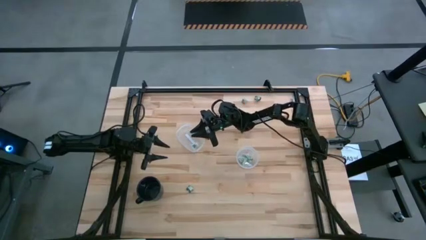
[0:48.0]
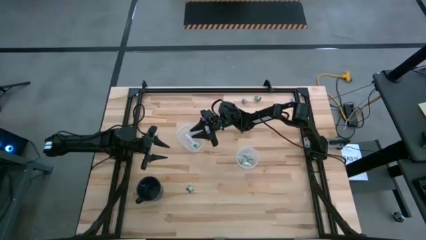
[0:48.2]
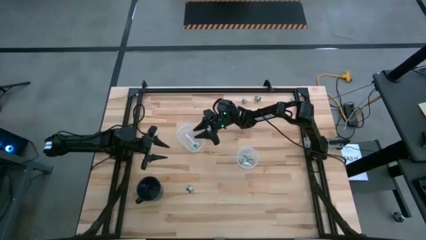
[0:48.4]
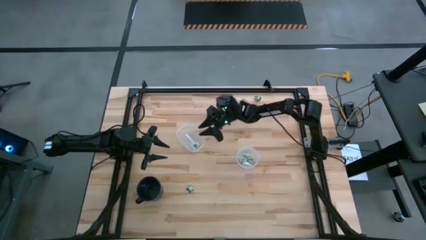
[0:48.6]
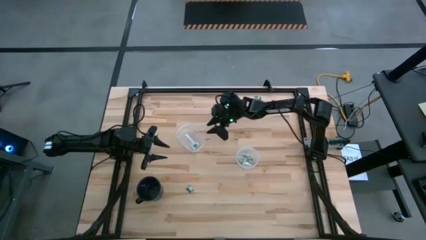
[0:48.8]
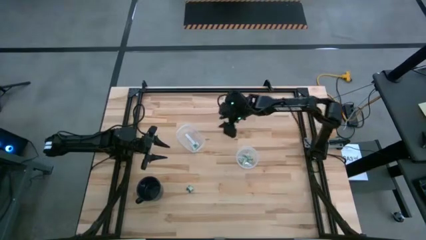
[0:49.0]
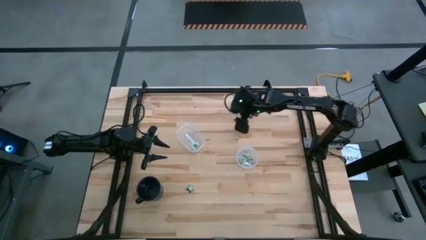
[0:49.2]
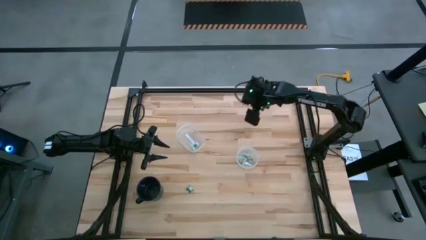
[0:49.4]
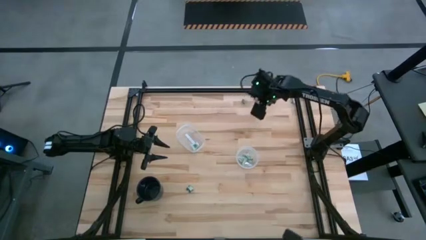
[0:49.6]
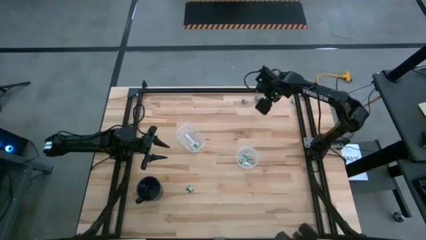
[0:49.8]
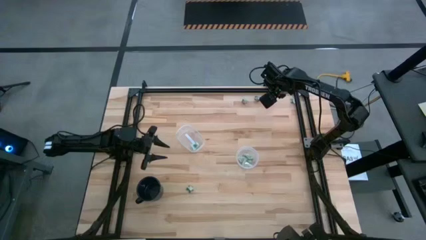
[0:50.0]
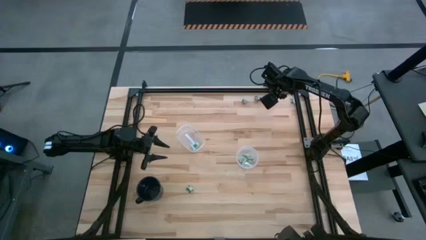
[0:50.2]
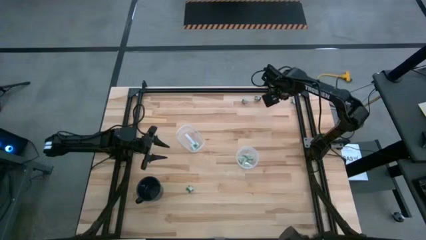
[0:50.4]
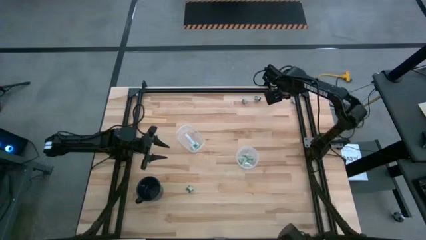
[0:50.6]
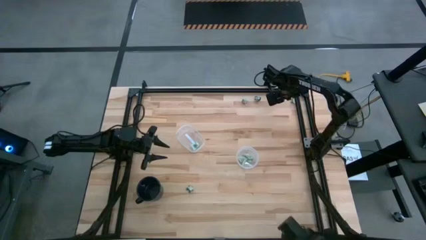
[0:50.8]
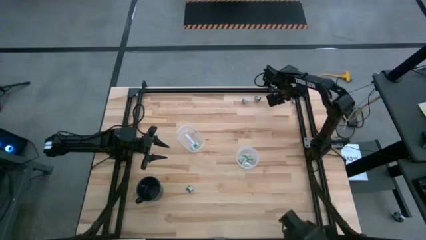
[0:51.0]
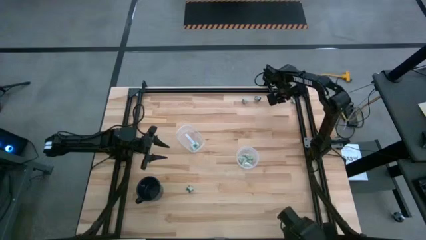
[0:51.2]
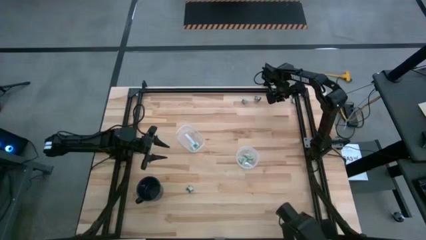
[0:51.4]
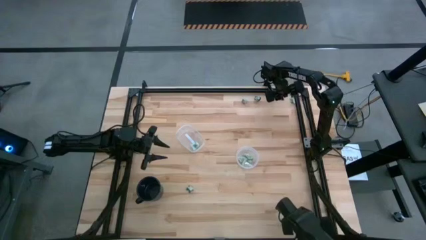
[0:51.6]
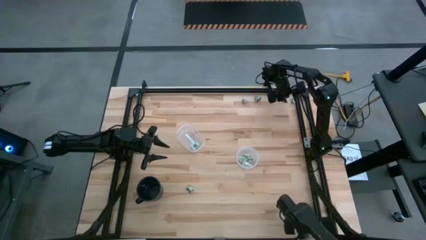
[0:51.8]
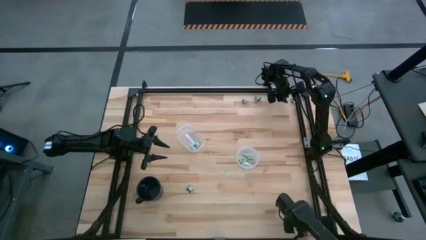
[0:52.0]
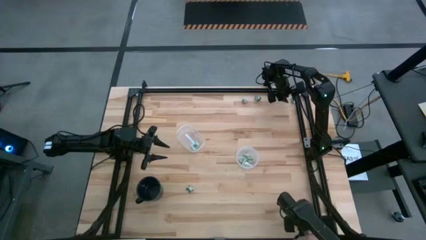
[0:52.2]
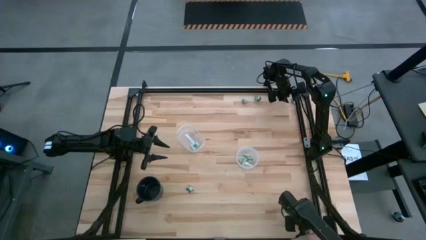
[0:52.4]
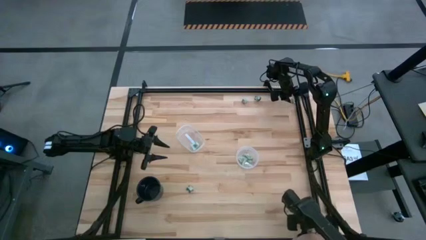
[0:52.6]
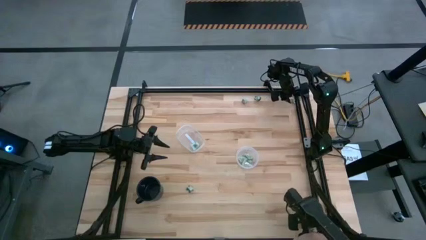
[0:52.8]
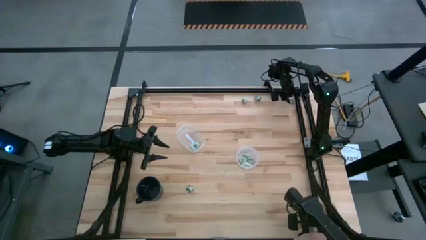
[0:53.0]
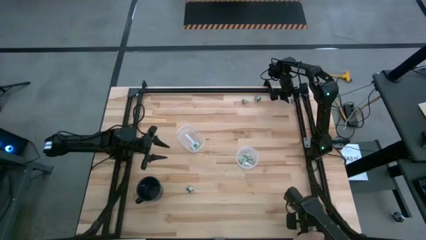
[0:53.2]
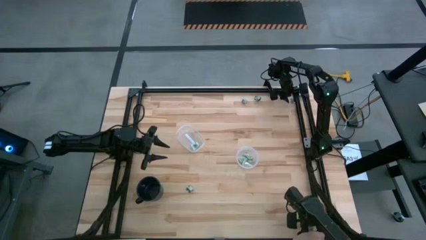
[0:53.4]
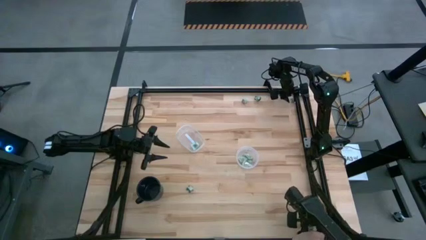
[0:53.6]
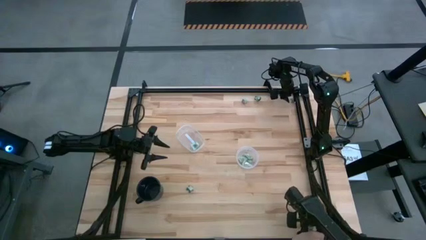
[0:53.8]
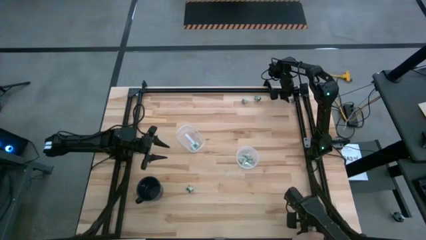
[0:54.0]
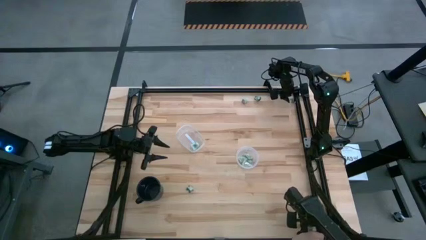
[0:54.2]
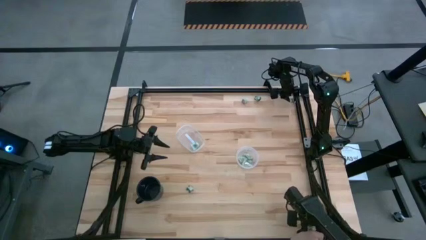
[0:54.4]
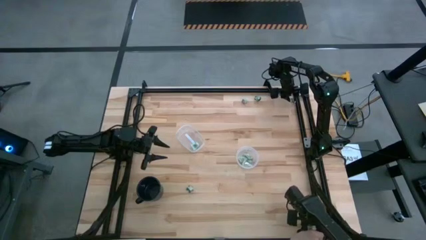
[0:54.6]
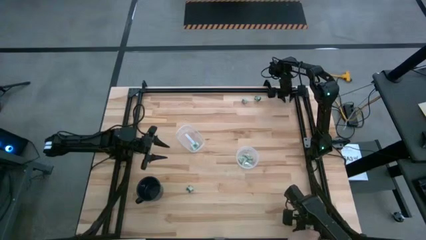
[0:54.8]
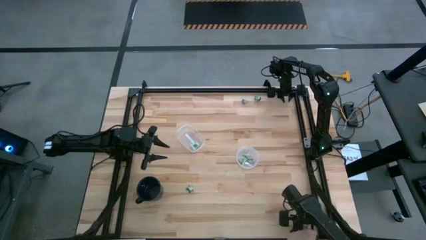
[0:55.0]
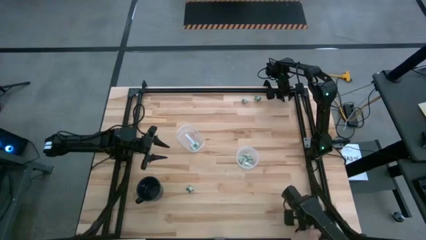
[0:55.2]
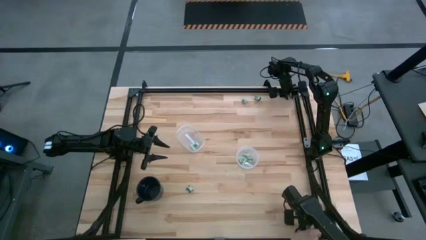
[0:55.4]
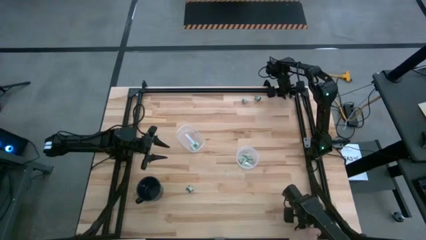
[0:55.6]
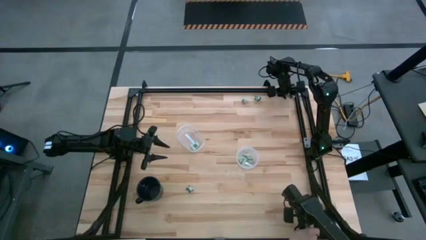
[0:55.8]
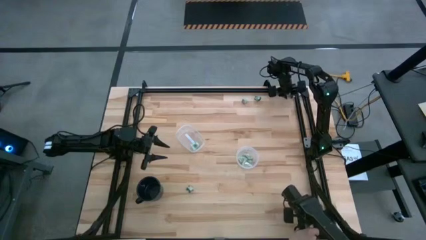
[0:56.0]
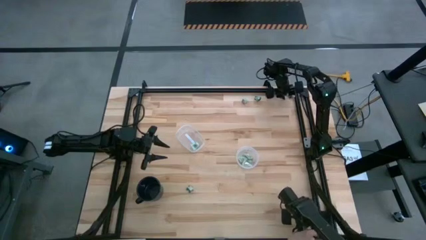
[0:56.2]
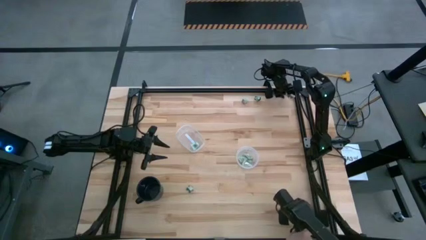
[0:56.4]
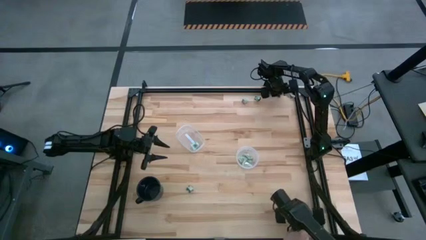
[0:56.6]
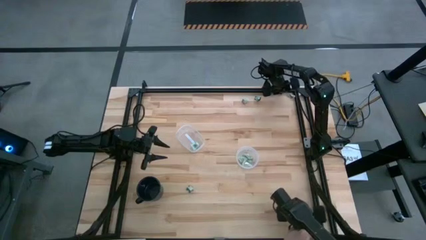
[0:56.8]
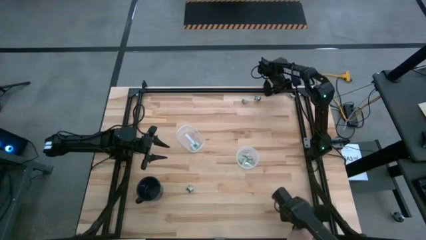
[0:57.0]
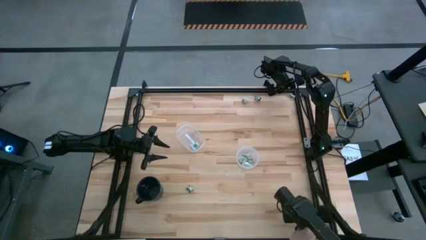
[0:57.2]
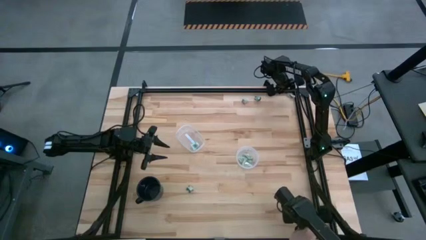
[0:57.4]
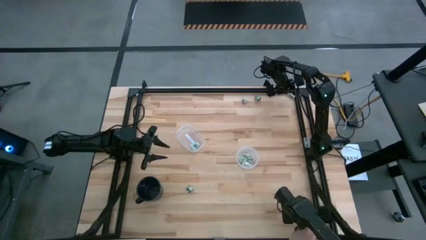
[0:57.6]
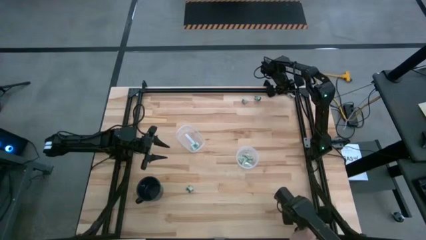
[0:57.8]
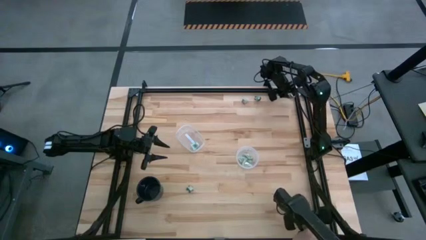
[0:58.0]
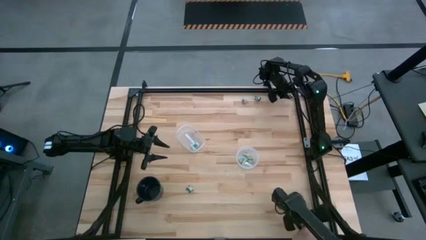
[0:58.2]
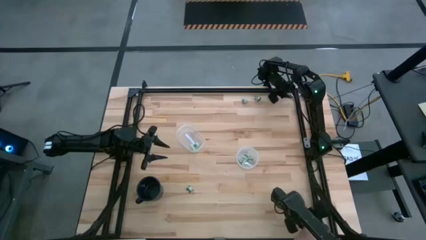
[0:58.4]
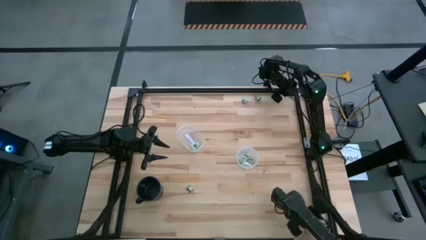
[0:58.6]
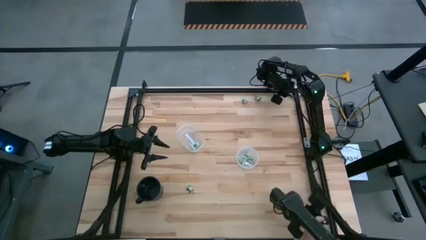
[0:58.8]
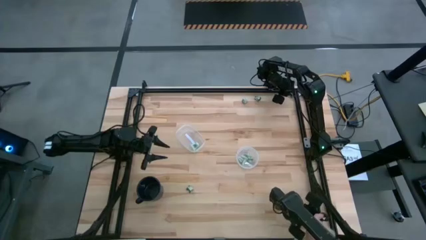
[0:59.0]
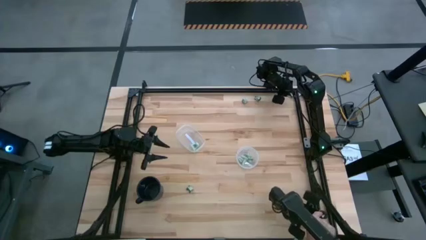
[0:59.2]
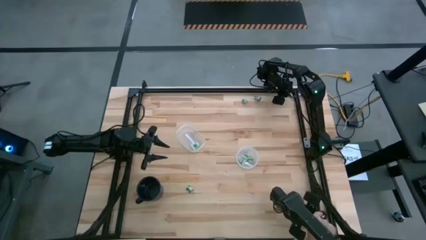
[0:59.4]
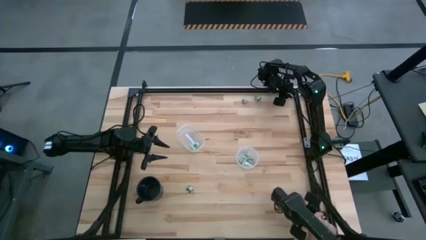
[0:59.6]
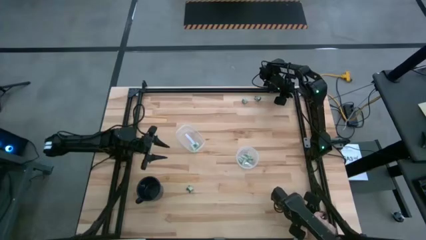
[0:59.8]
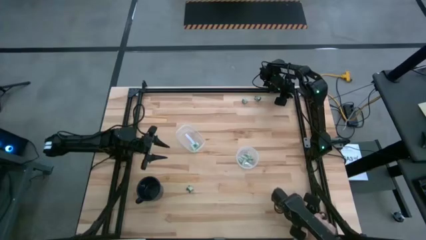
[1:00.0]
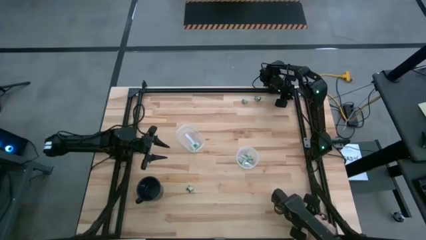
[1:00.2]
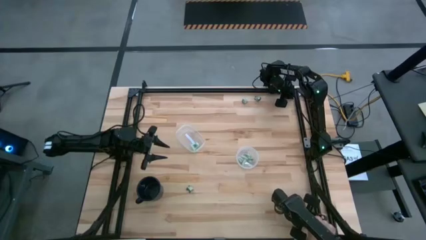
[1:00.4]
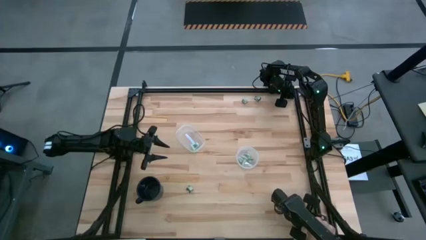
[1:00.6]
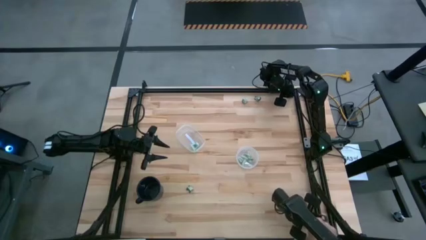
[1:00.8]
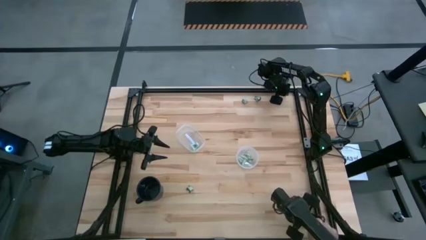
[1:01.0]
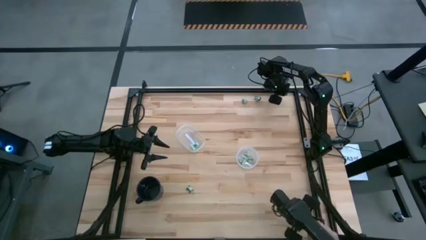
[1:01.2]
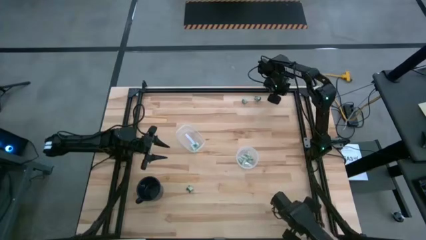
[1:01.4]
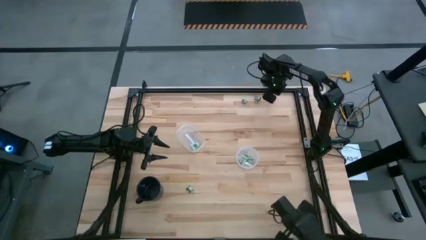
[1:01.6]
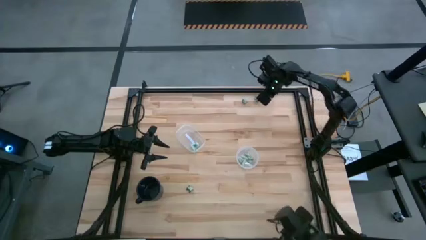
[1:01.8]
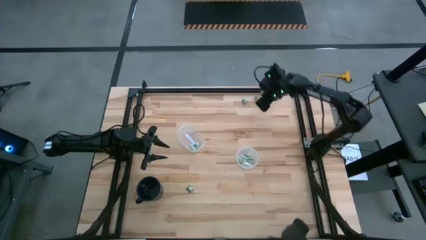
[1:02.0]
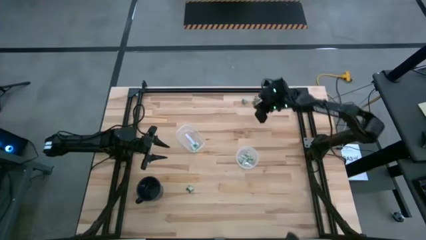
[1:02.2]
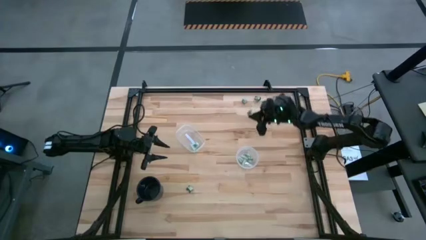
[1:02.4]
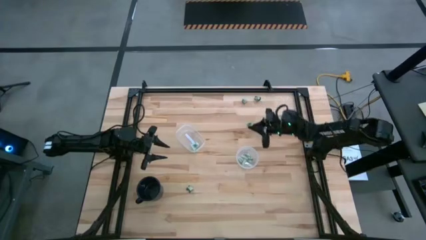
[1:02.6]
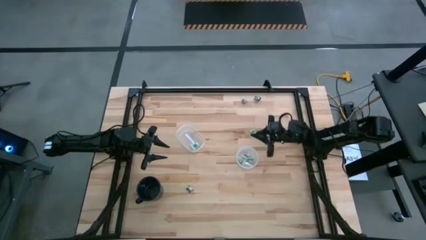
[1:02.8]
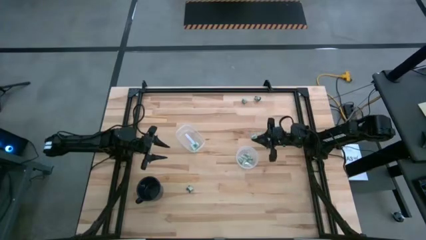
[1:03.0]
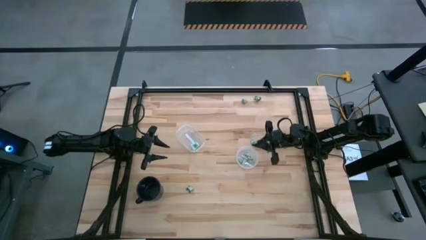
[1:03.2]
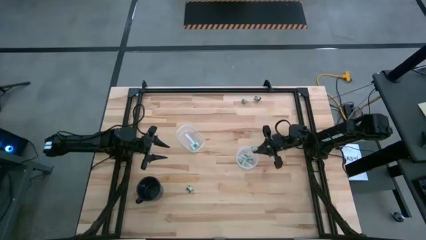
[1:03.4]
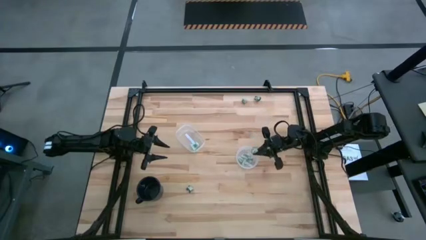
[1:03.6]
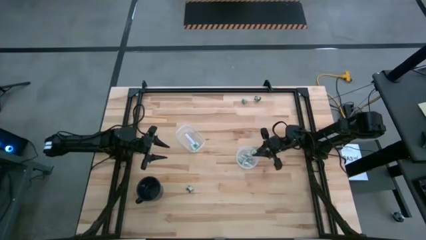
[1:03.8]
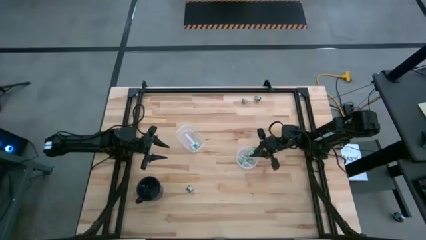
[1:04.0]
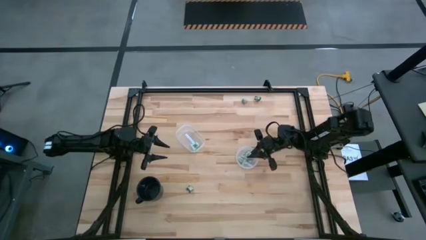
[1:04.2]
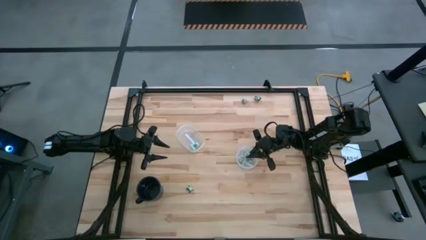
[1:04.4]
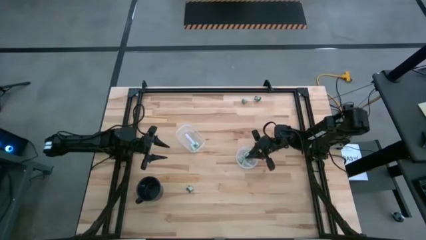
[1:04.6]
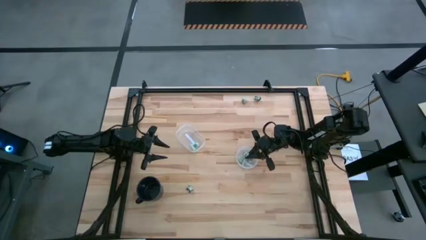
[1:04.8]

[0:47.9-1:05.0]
Task: Pick and place Stevia / Truvia into bins
Put the right white stevia packet into the right transparent container
